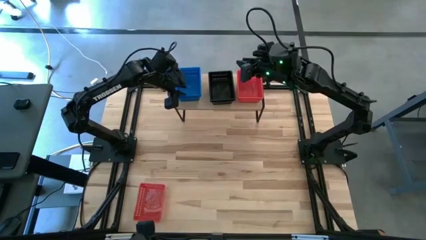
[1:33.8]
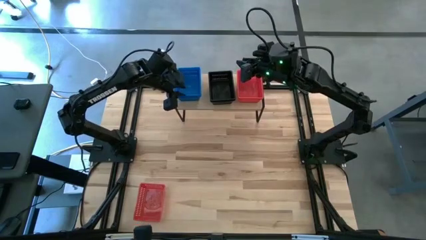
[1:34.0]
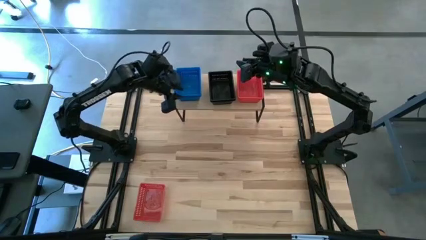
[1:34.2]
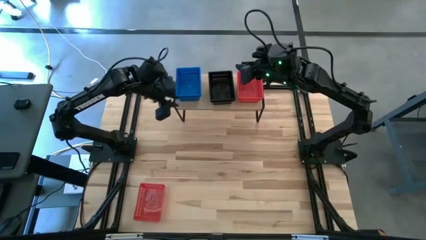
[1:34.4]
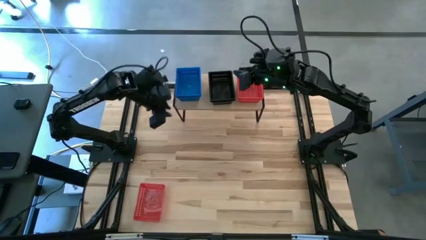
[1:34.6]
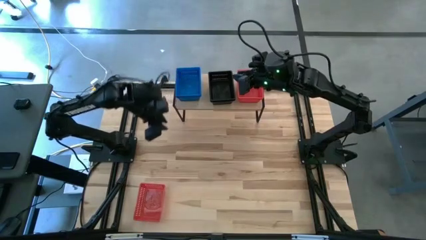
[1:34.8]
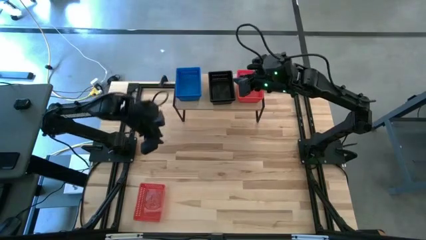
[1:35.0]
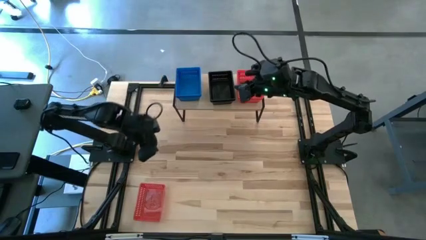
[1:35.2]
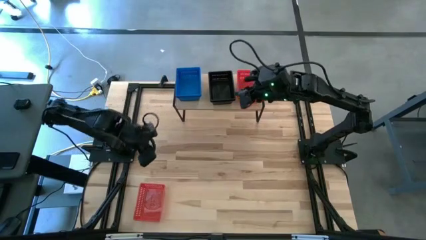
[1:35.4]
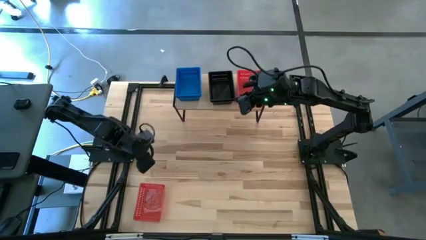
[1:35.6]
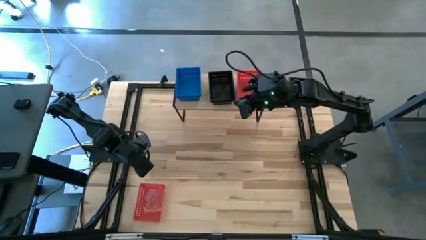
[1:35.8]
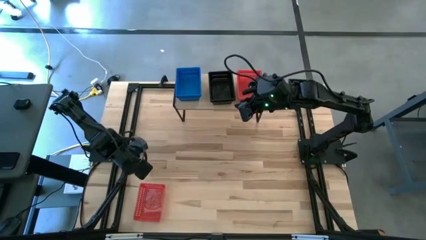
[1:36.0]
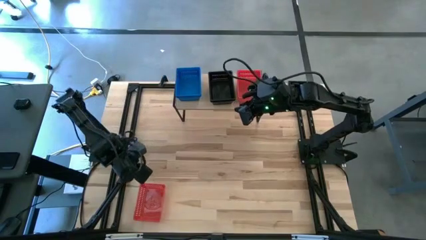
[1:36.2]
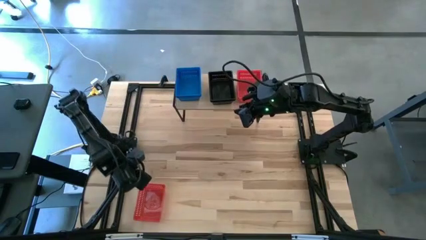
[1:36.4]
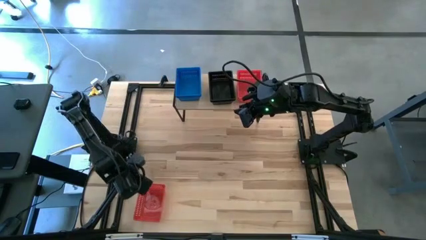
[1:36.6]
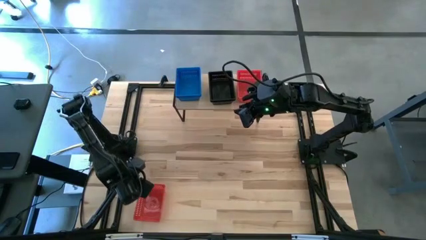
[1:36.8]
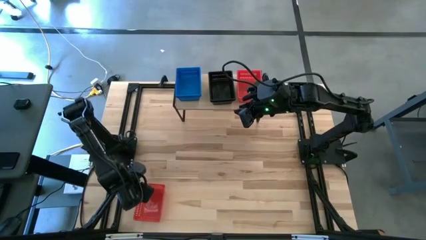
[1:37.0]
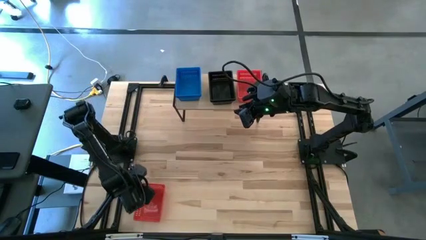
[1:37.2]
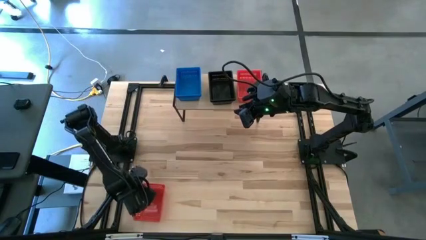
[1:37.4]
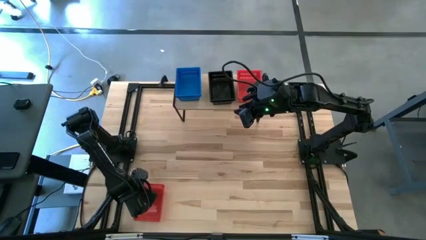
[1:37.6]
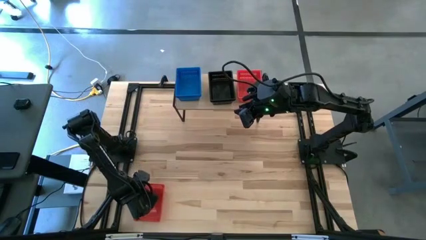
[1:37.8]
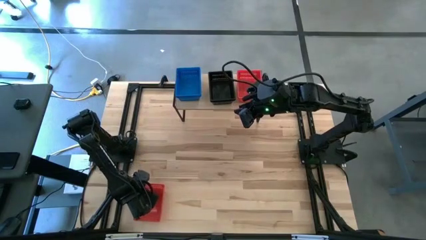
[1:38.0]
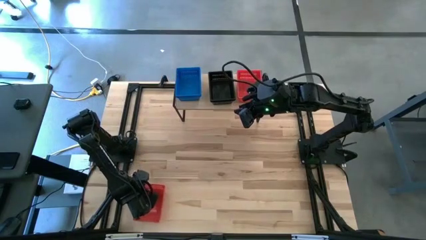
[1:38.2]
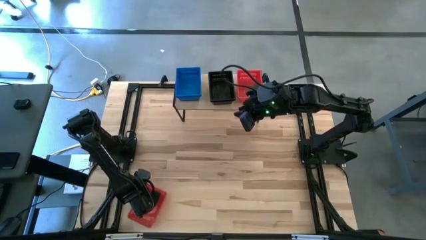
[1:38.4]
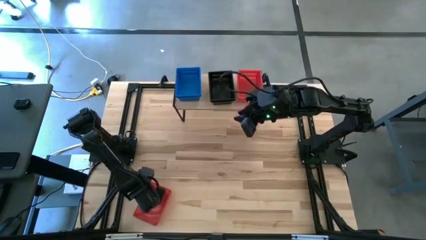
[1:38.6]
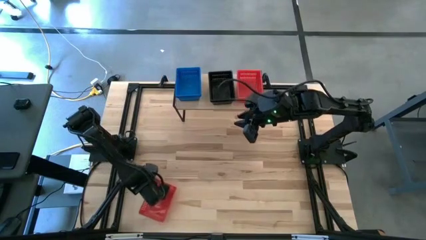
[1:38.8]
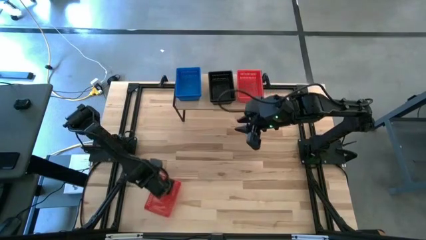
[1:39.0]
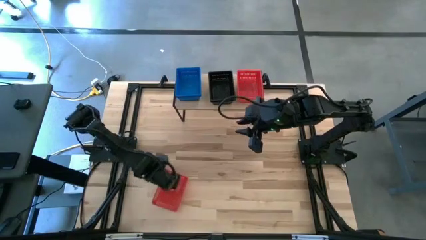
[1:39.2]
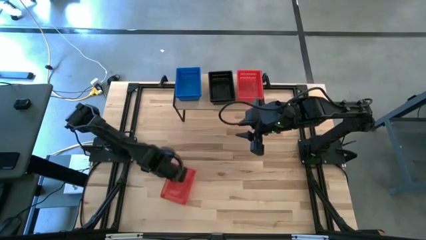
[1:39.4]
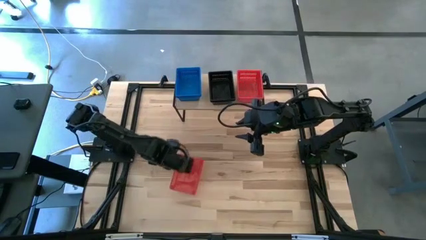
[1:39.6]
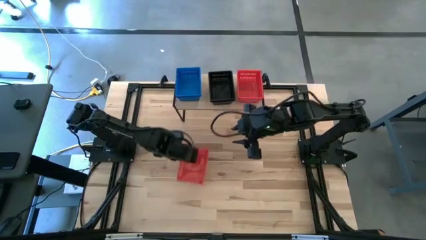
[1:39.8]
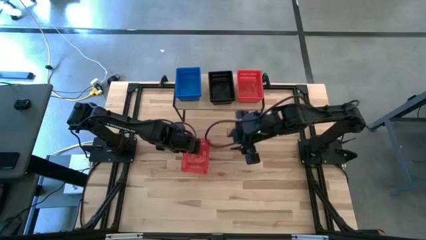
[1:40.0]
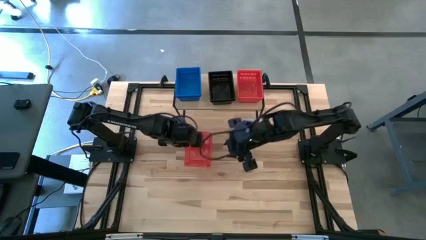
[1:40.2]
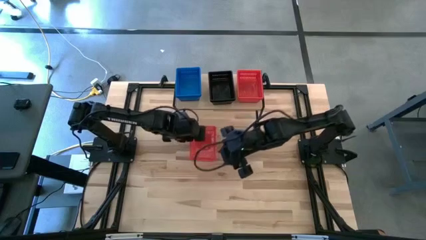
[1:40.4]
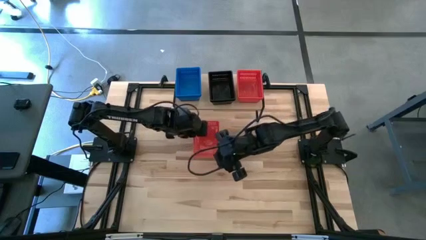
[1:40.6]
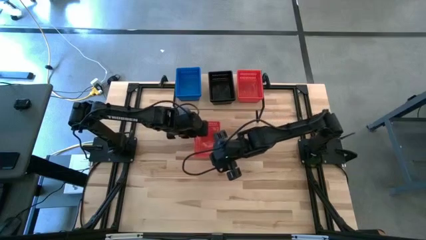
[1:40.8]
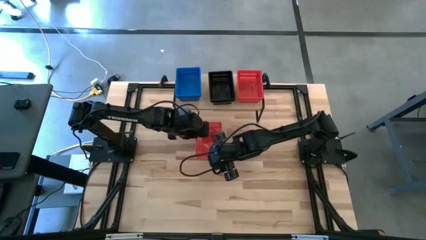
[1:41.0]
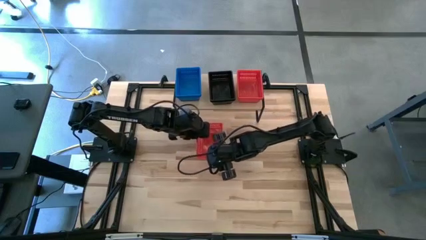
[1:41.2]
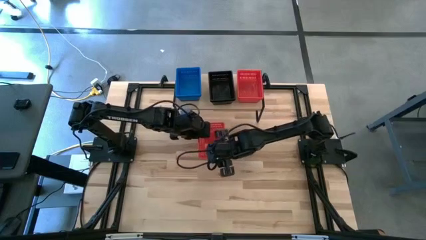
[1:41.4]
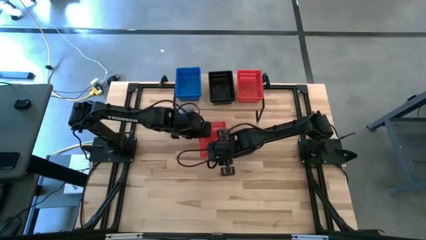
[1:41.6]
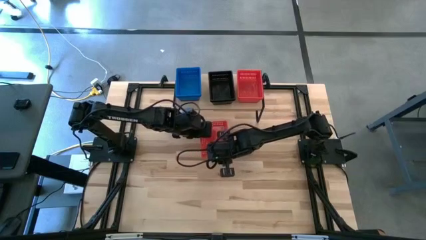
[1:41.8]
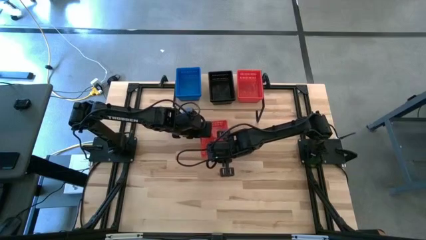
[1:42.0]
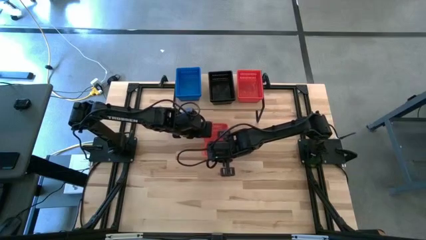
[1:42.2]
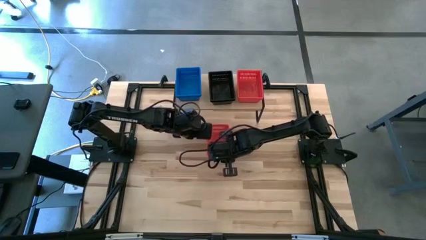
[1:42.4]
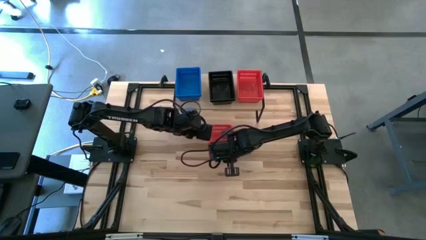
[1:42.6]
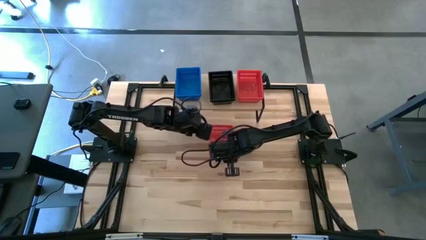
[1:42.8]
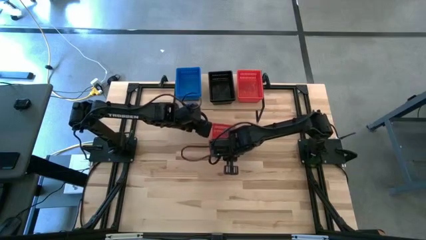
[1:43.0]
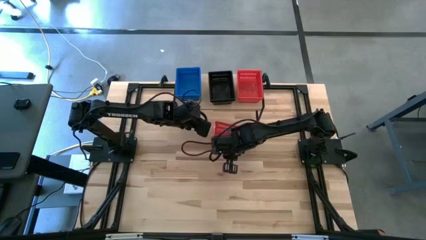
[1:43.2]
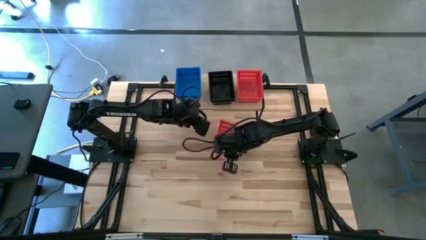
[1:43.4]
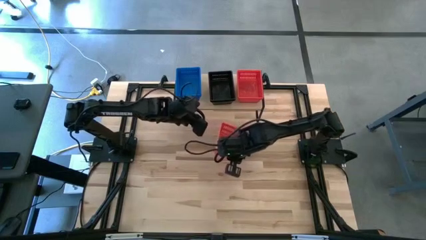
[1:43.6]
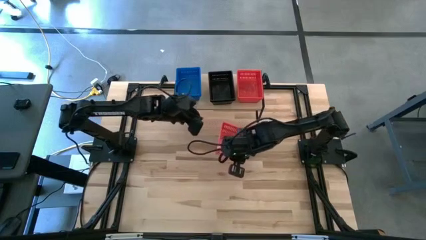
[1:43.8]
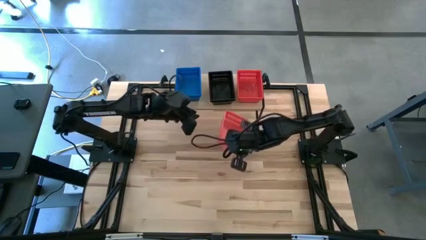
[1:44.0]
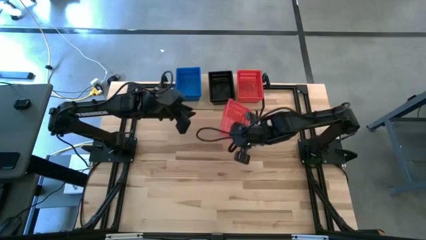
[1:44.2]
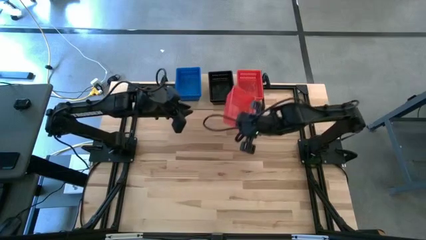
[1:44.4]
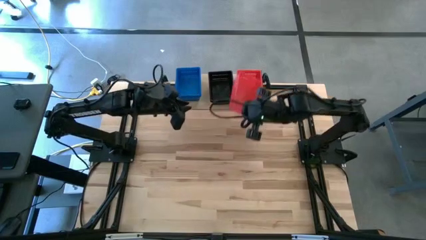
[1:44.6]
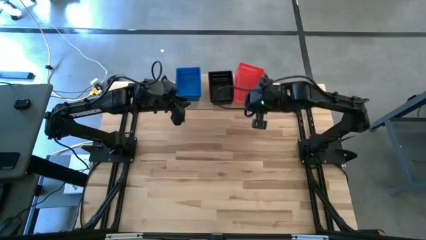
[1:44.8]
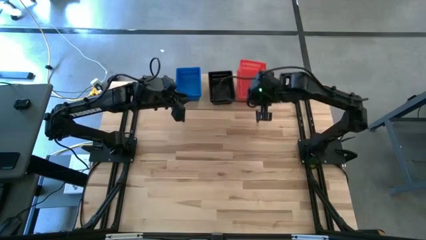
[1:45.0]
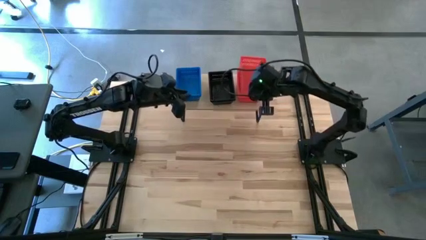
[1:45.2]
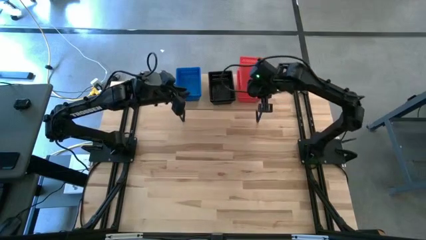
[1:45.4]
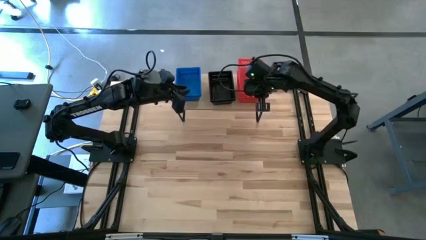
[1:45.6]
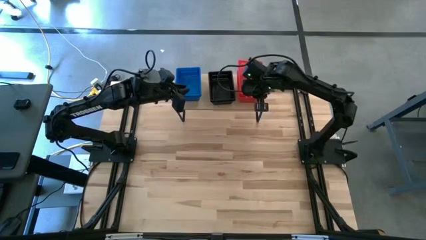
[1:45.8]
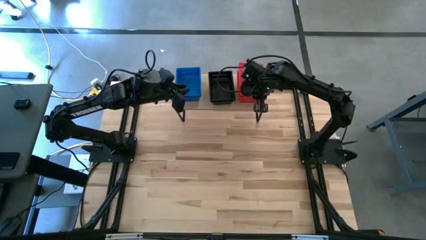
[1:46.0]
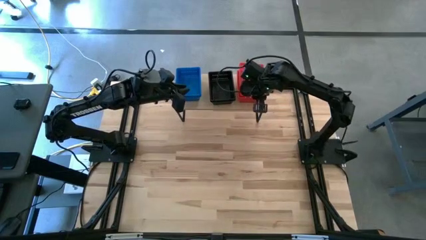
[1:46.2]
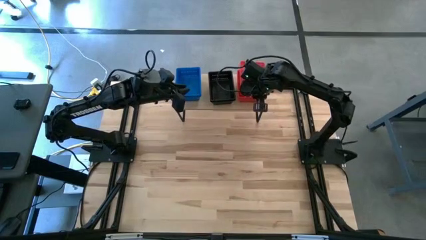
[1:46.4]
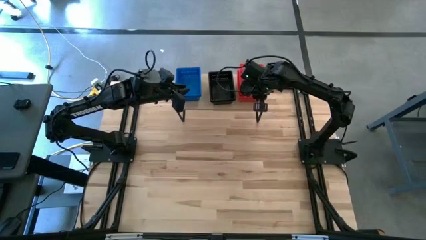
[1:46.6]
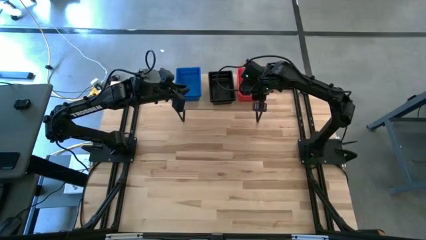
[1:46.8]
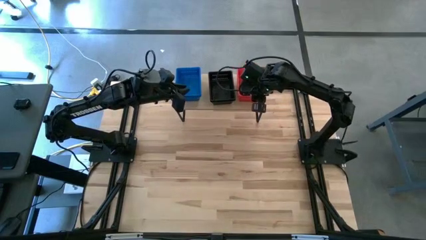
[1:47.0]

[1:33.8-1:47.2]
Task: Stack baskets on shelf by color
Stack the red bin on top of the other red bin on the shelf
